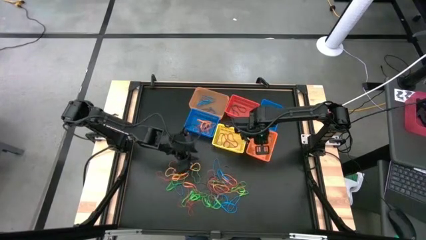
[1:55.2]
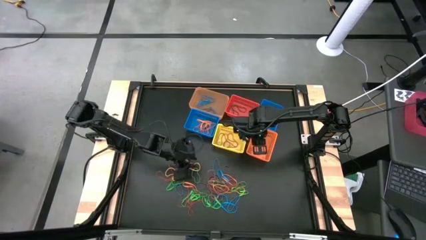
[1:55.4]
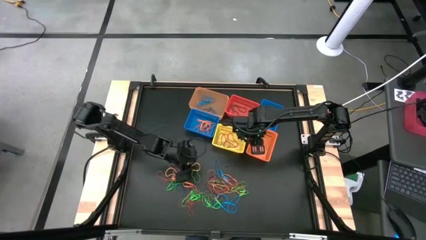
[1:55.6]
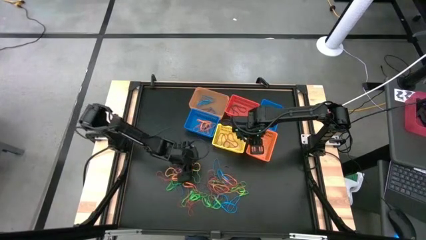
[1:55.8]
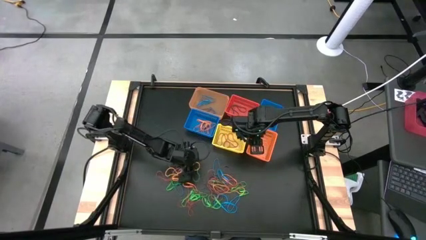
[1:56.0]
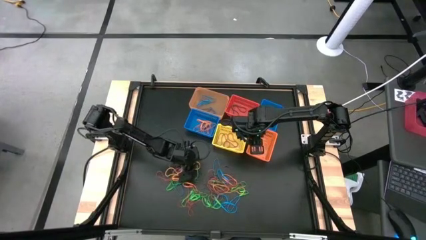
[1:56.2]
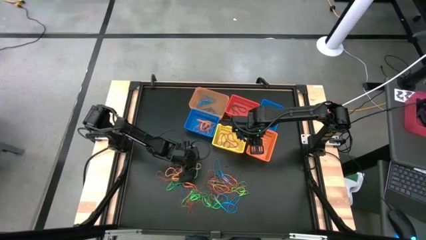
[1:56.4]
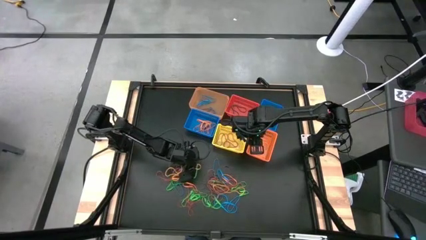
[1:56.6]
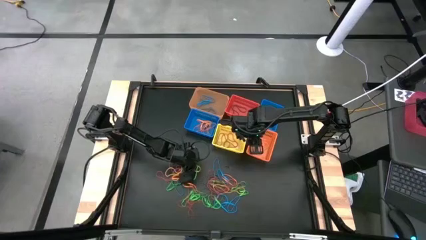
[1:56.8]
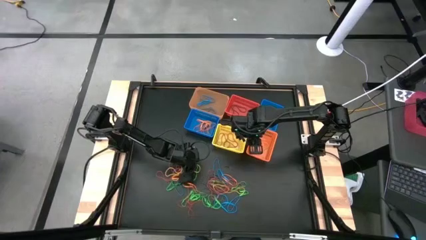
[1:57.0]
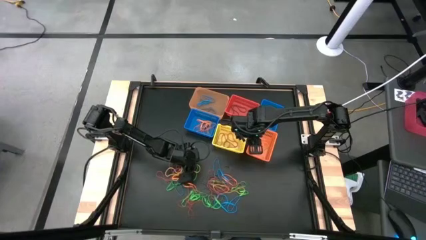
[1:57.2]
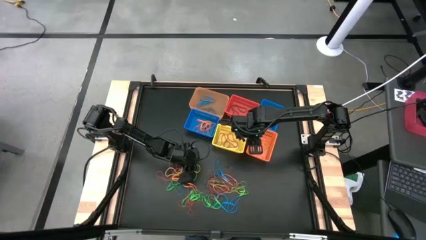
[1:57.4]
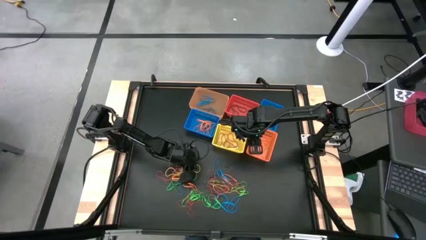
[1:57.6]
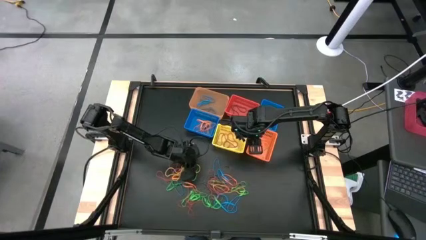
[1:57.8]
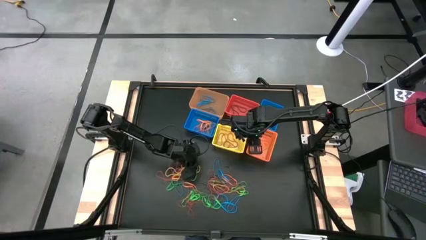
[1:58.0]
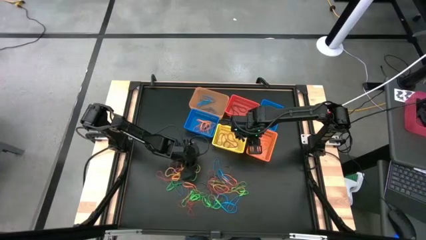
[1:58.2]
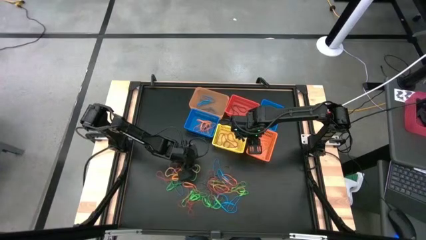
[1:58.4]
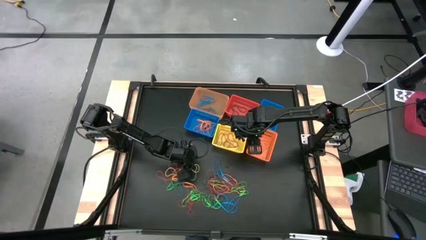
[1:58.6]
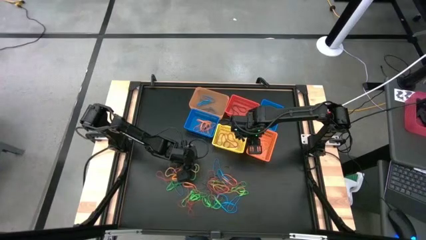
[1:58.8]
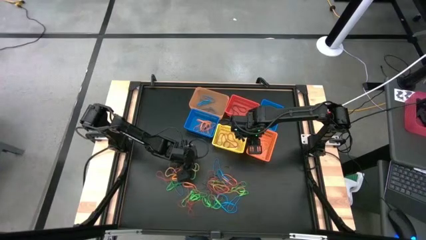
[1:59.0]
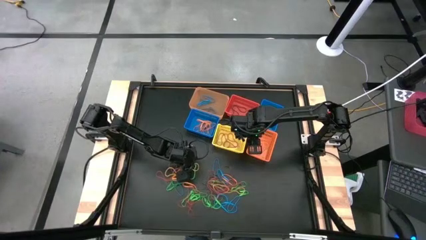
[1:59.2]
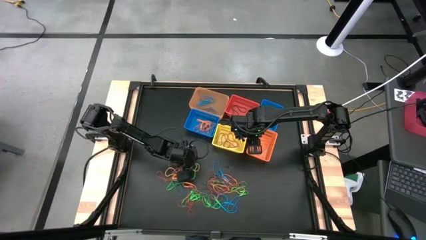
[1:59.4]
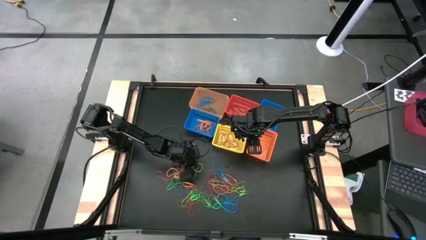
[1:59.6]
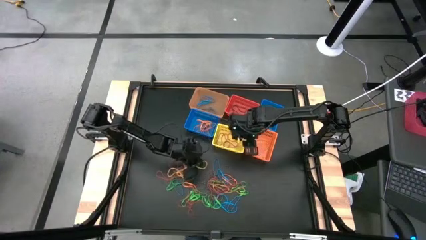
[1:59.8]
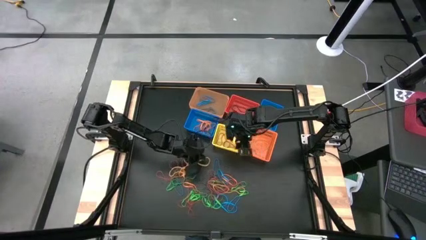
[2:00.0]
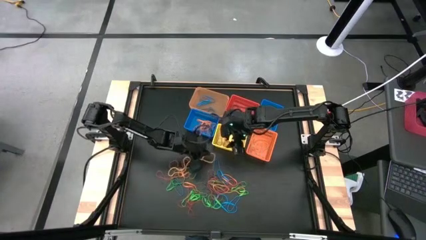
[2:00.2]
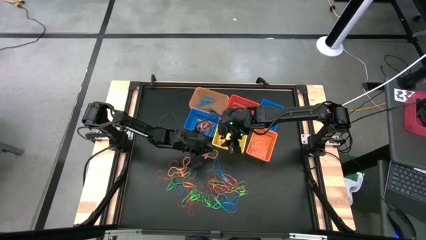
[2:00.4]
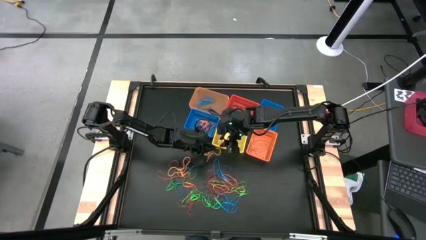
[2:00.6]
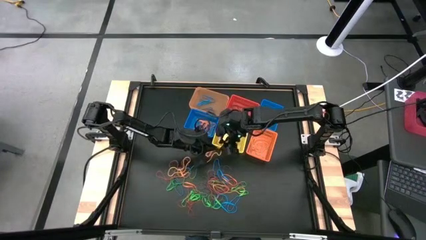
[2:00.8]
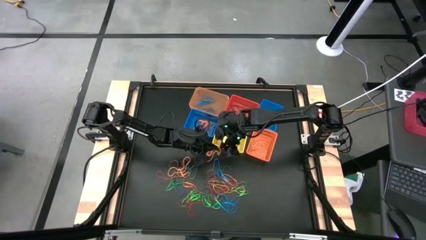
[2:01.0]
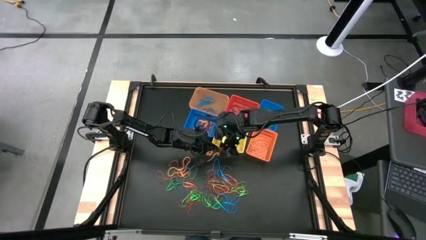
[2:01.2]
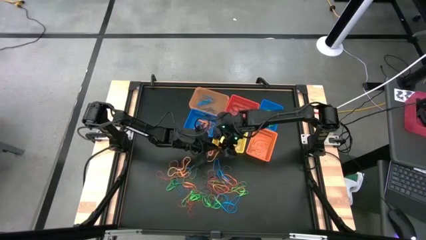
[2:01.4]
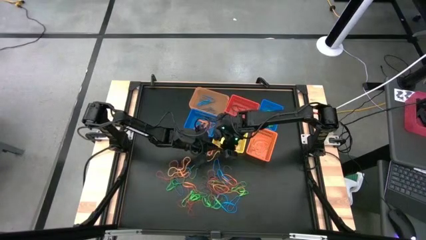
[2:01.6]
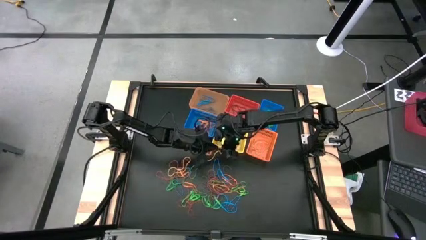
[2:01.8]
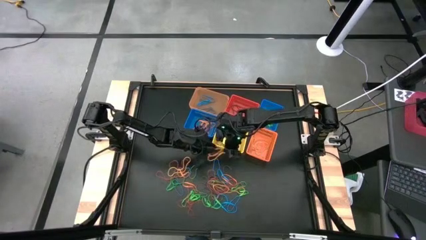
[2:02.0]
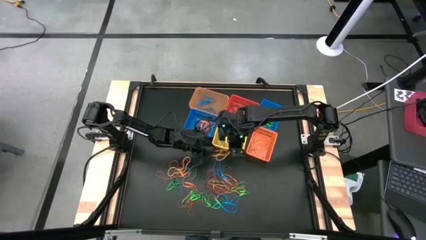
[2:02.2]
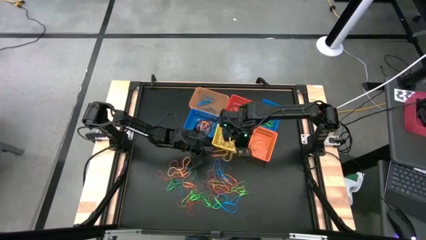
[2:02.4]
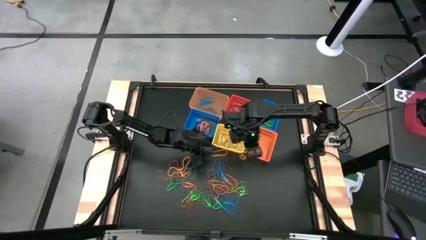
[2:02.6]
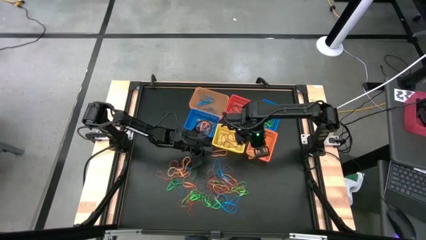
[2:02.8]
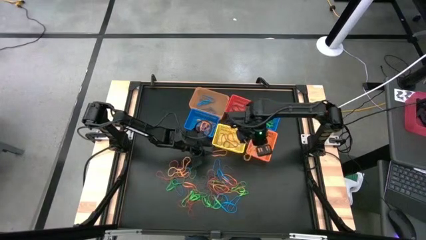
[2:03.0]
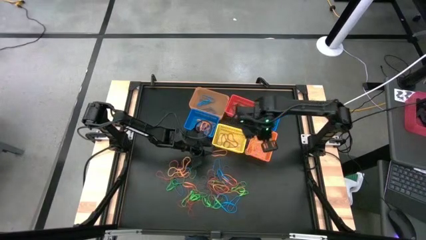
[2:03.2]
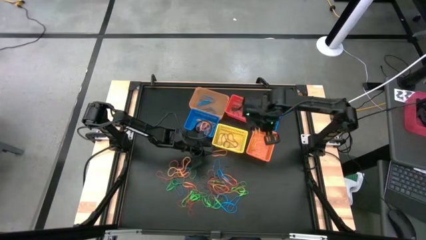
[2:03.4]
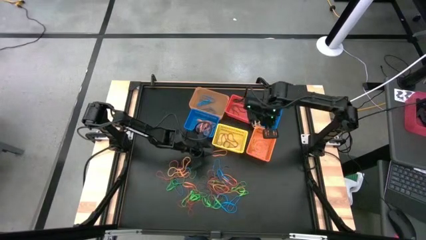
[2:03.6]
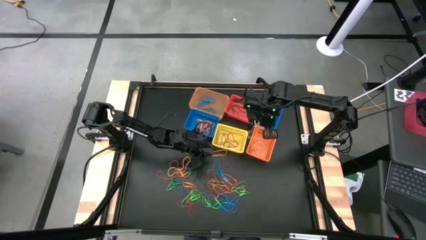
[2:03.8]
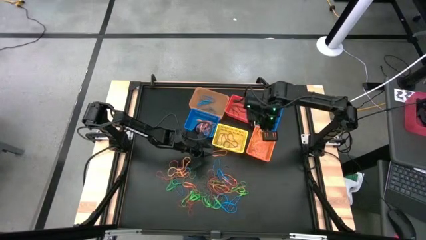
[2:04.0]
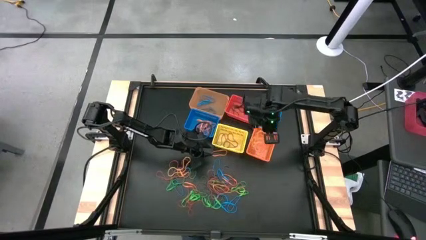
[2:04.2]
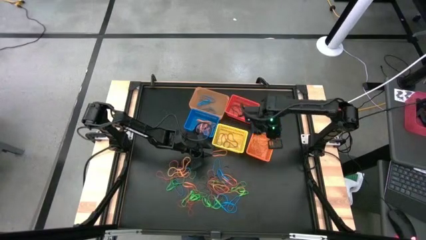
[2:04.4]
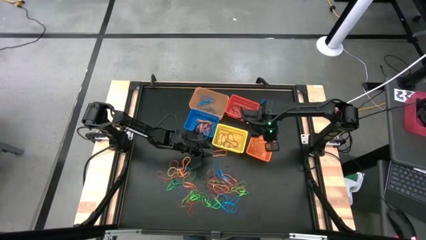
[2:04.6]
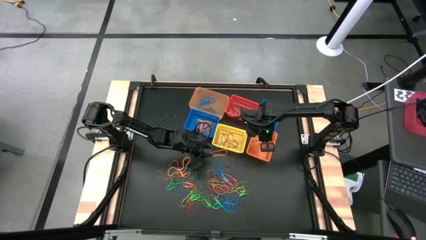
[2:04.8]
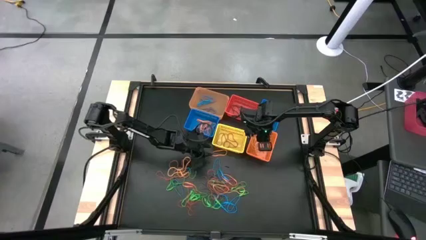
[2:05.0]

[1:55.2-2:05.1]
Task: Sort rubber bands into baskets
Put the yellow rubber band into the orange basket

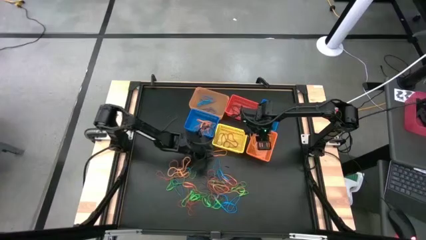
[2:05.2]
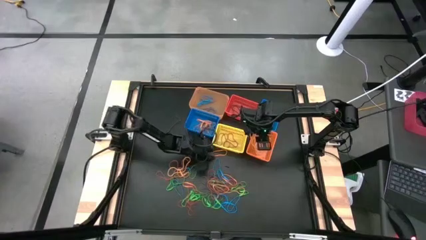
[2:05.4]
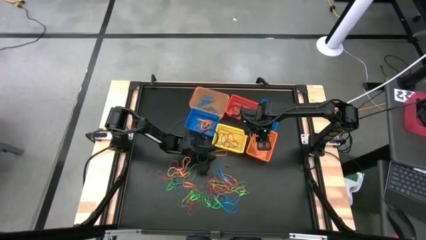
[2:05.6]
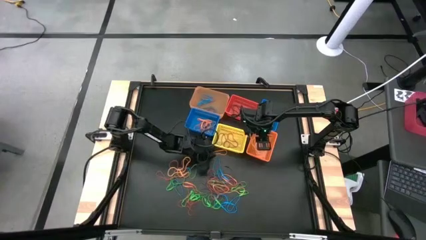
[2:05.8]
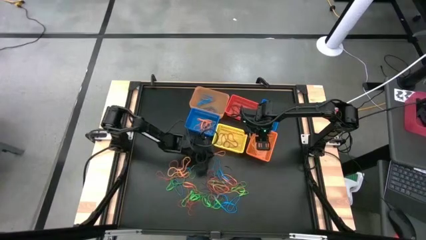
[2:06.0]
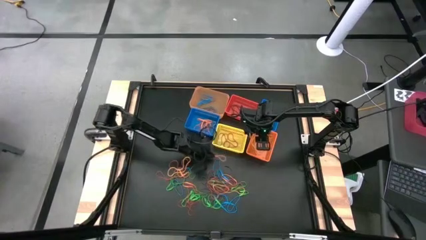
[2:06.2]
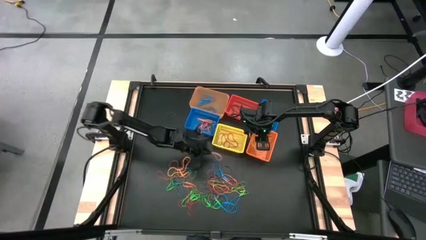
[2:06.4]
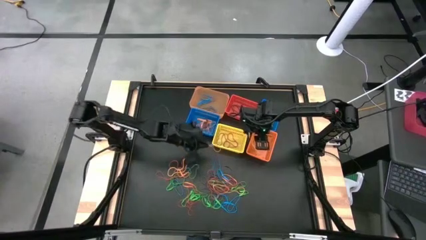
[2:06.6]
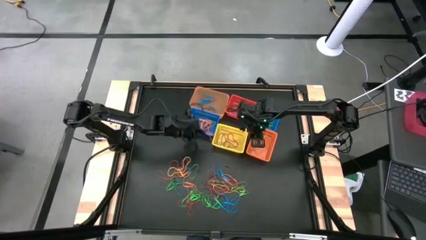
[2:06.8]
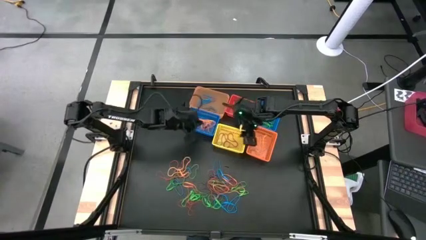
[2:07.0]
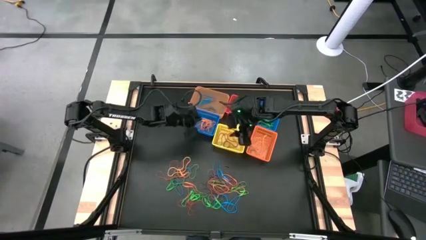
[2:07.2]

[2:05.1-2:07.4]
Put the orange rubber band into the left blue basket

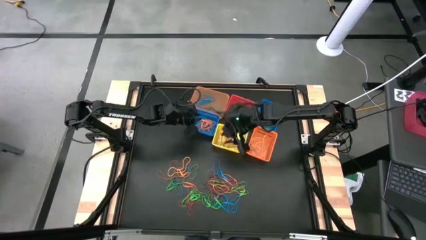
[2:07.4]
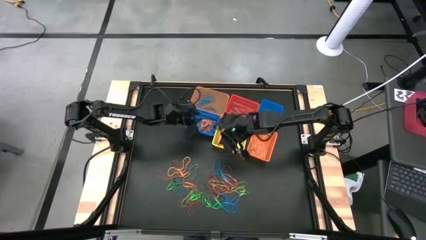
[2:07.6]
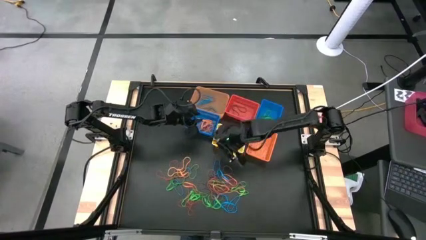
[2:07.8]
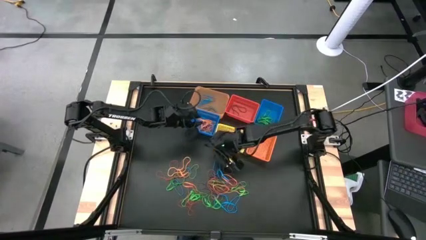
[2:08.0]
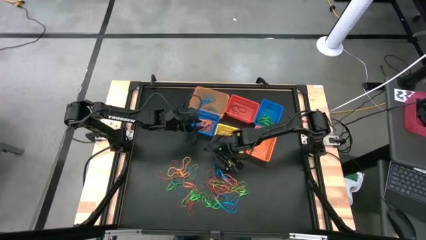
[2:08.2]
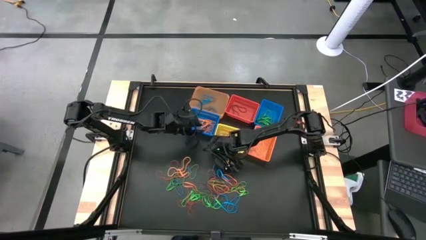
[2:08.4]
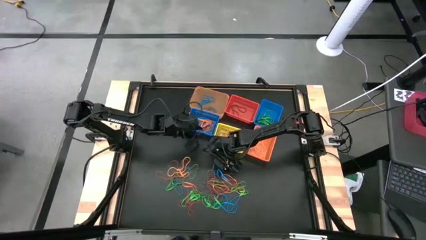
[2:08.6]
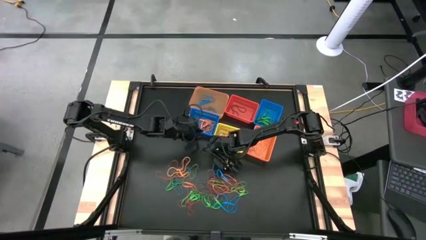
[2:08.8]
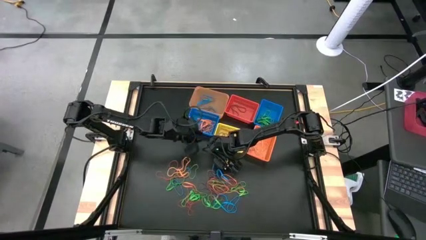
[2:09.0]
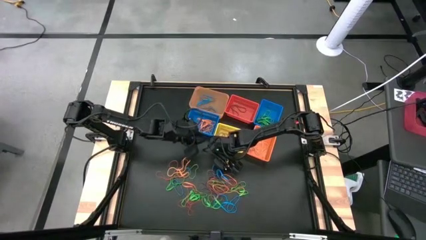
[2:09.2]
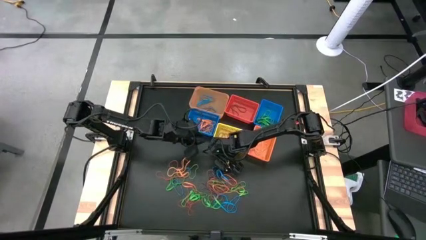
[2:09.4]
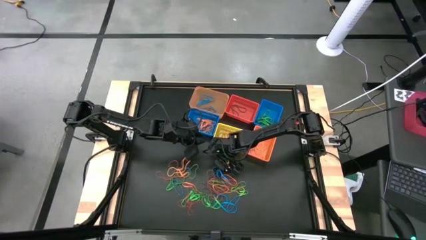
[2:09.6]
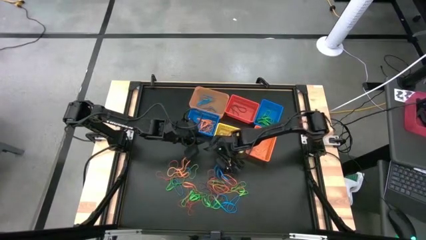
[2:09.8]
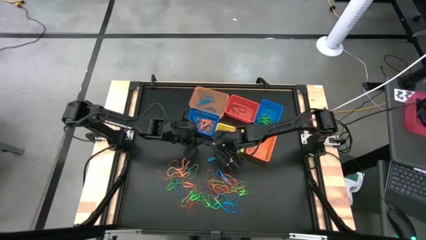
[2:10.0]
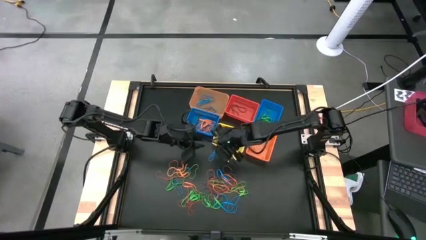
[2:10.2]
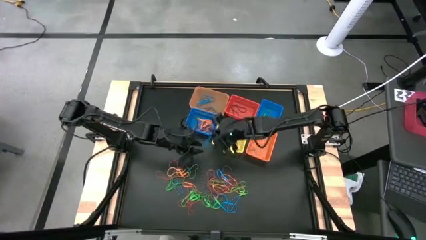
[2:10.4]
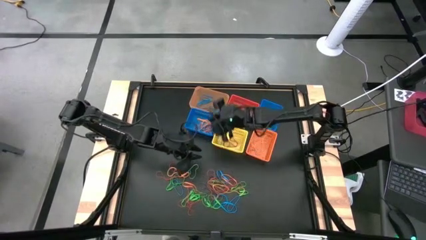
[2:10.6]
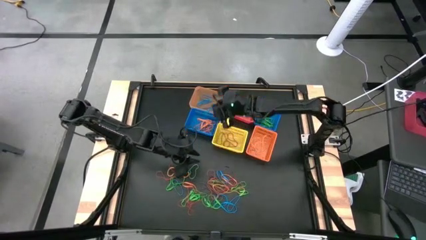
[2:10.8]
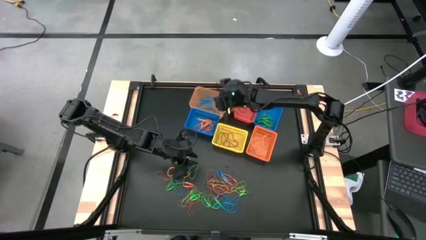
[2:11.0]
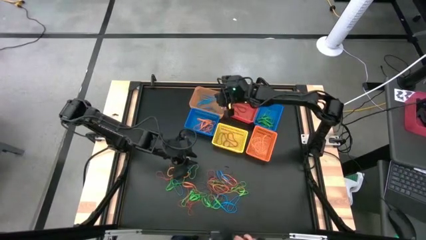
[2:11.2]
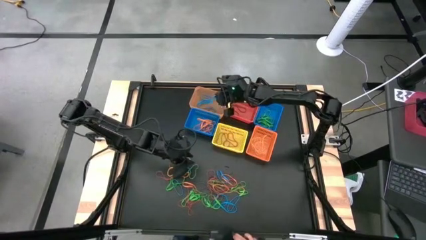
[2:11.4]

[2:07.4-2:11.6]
Put the blue rubber band into the transparent orange basket

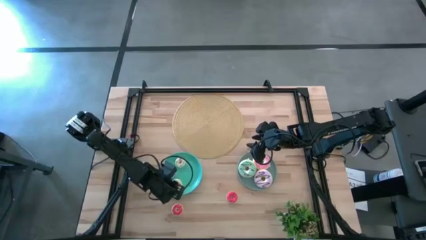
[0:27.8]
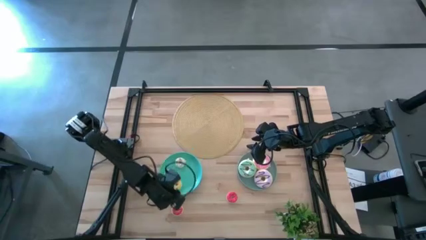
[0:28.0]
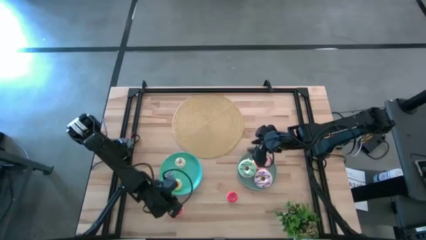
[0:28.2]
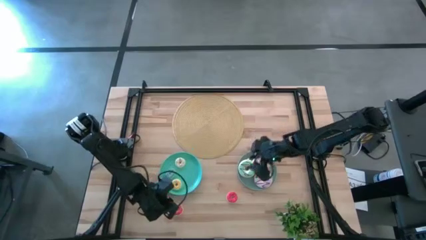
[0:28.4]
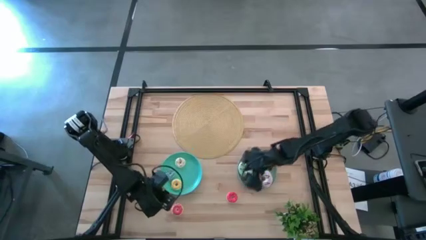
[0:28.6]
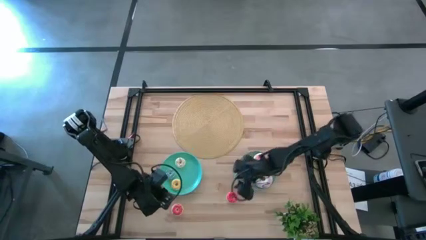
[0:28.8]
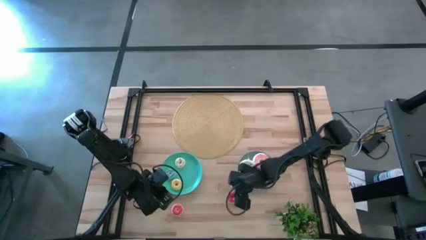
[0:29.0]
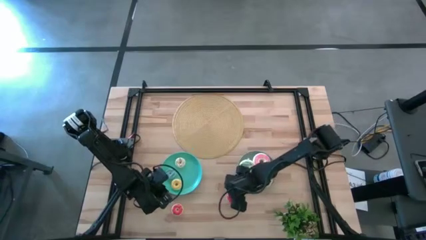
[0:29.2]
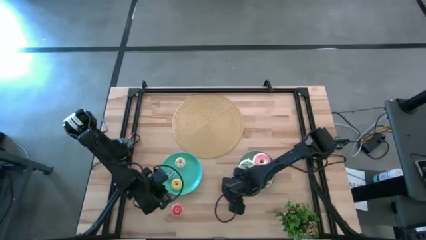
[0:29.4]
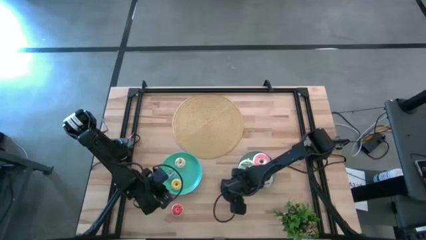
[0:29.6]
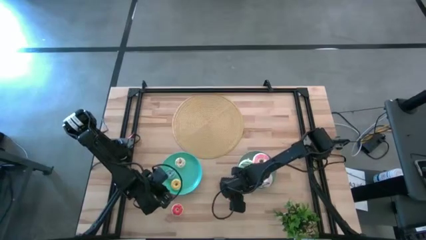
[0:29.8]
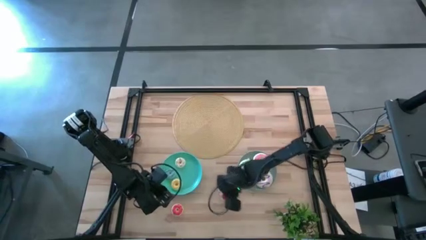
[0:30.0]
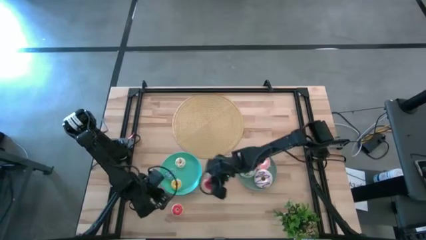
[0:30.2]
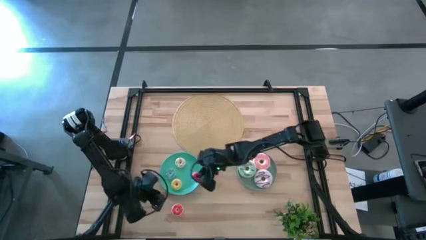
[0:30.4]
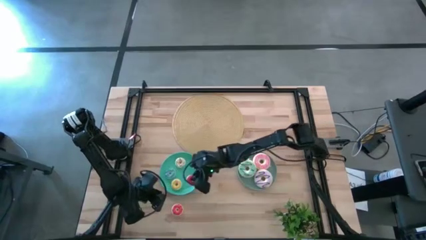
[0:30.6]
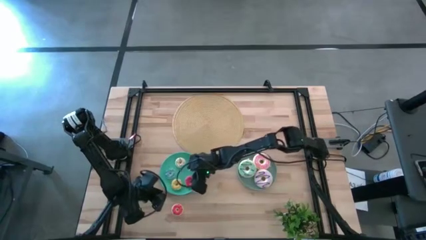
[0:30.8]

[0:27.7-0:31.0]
Task: Pick & Place donuts
Put the small red donut on the light green plate
